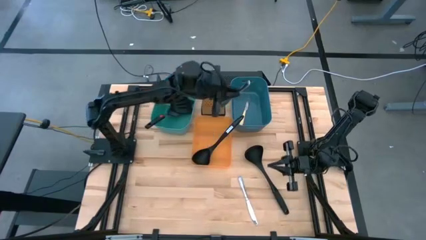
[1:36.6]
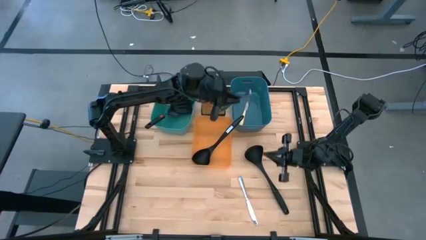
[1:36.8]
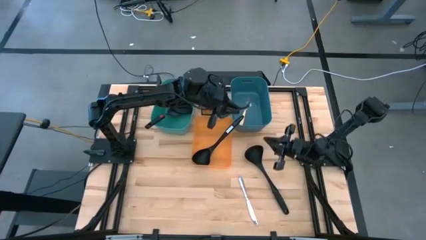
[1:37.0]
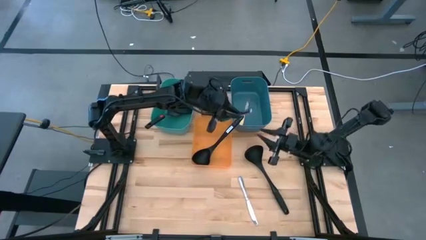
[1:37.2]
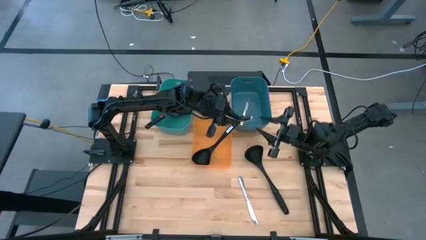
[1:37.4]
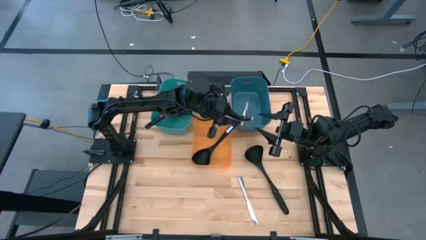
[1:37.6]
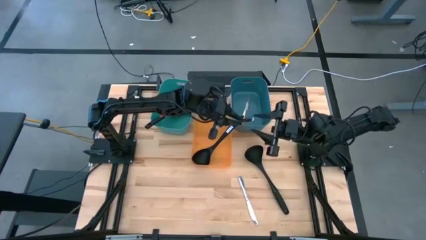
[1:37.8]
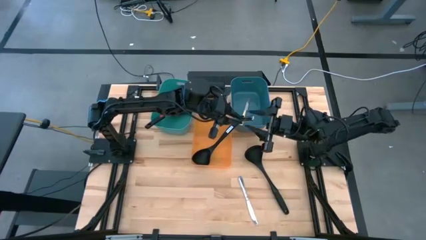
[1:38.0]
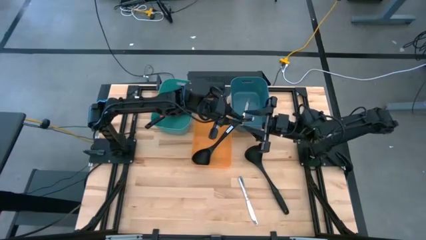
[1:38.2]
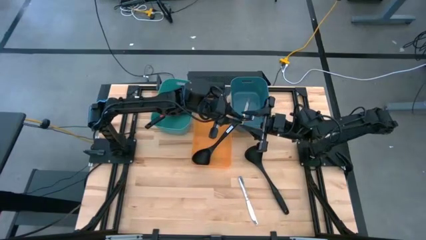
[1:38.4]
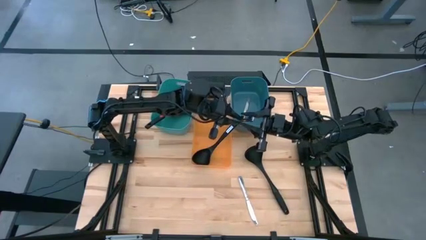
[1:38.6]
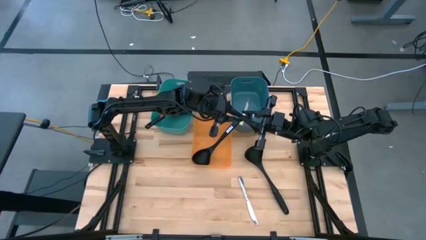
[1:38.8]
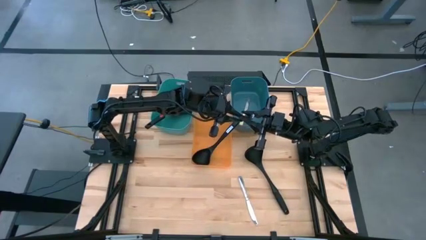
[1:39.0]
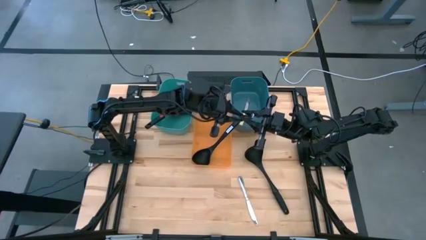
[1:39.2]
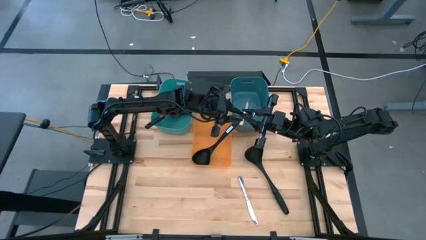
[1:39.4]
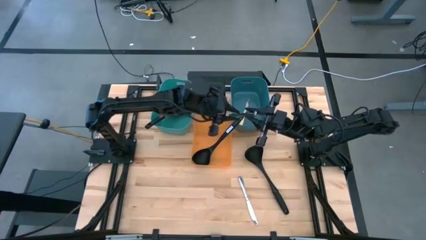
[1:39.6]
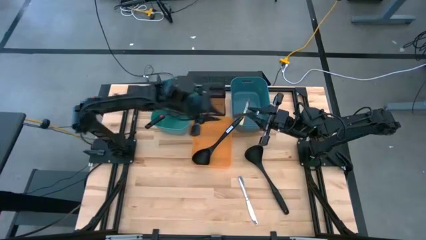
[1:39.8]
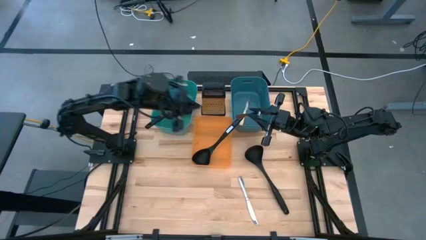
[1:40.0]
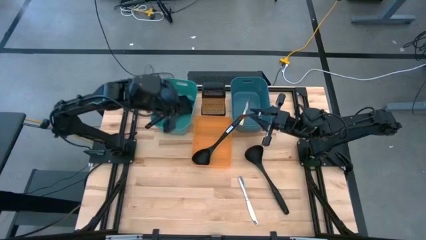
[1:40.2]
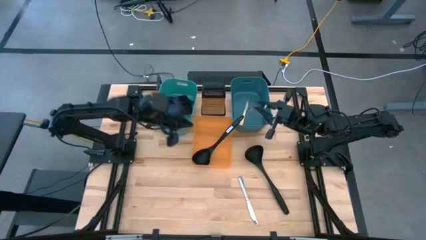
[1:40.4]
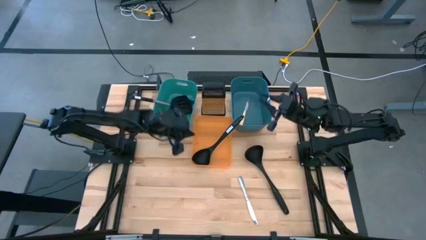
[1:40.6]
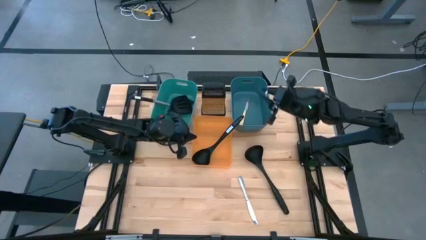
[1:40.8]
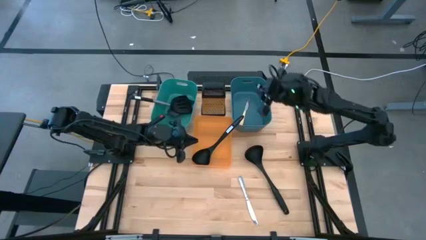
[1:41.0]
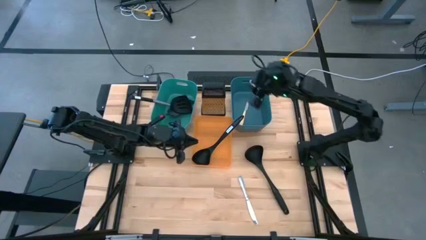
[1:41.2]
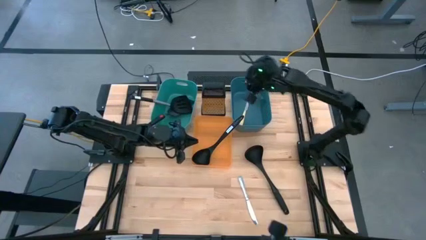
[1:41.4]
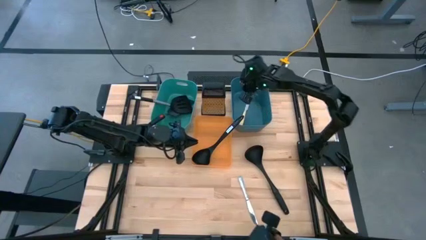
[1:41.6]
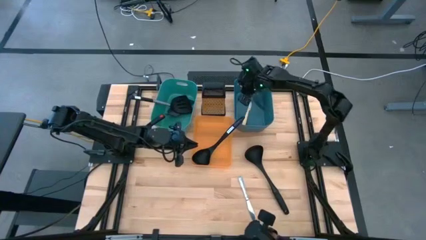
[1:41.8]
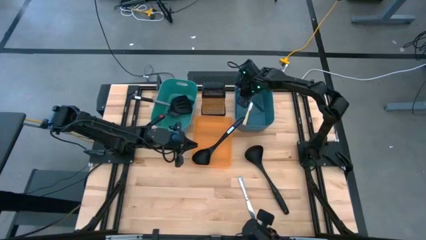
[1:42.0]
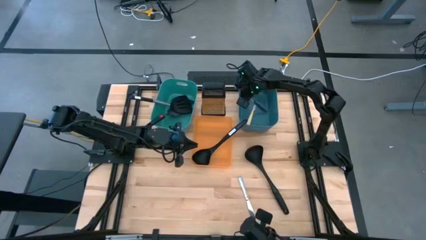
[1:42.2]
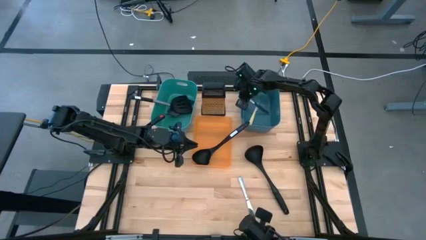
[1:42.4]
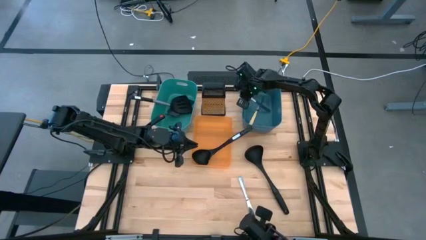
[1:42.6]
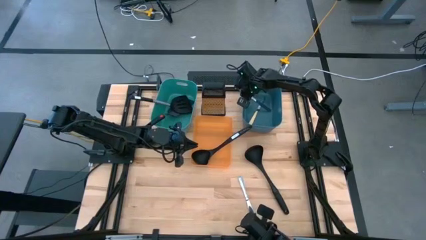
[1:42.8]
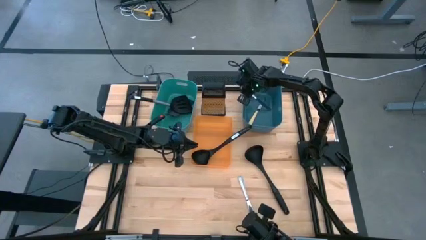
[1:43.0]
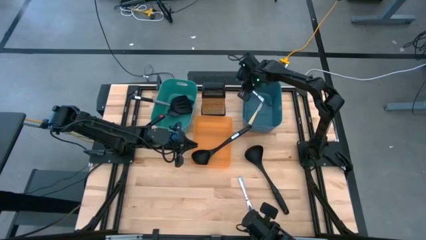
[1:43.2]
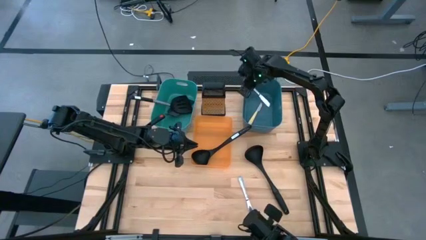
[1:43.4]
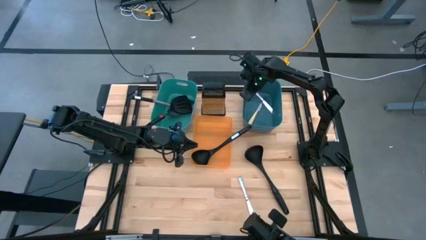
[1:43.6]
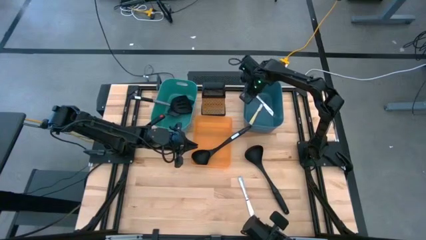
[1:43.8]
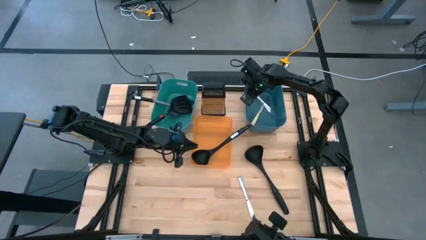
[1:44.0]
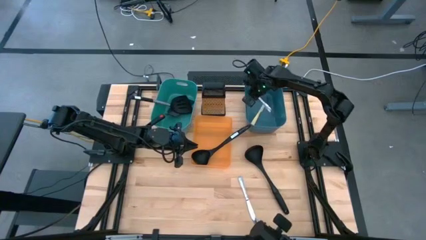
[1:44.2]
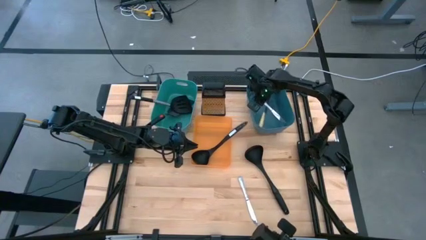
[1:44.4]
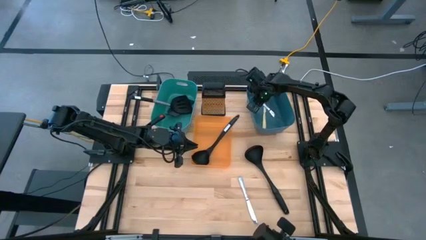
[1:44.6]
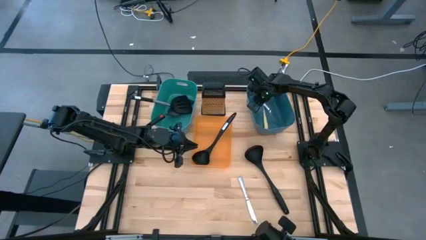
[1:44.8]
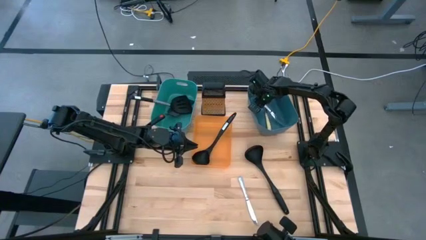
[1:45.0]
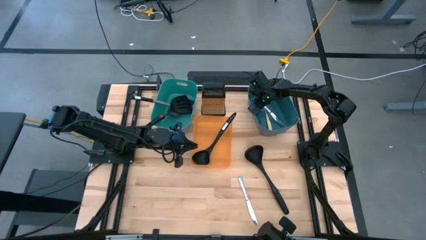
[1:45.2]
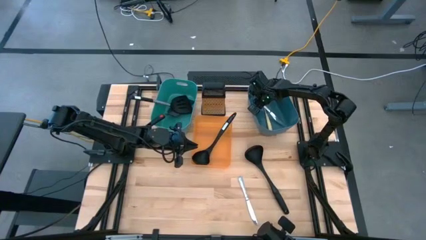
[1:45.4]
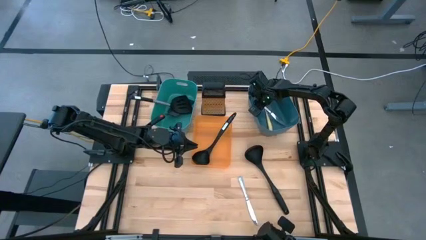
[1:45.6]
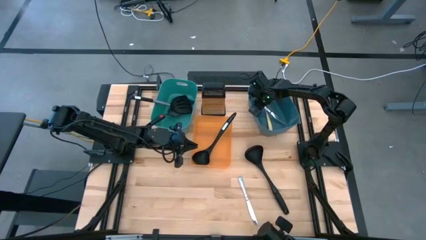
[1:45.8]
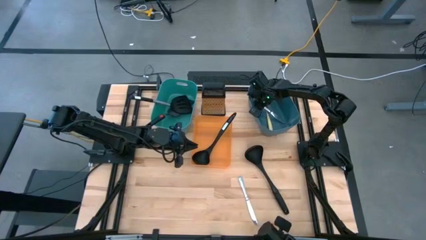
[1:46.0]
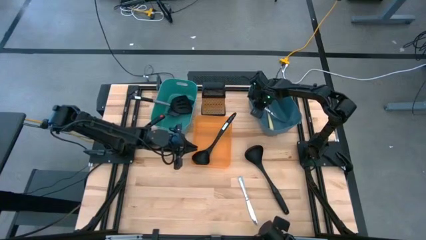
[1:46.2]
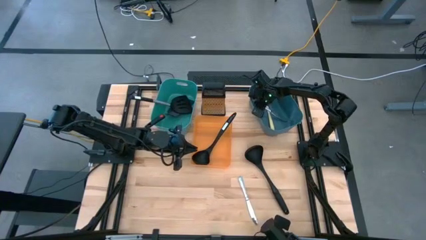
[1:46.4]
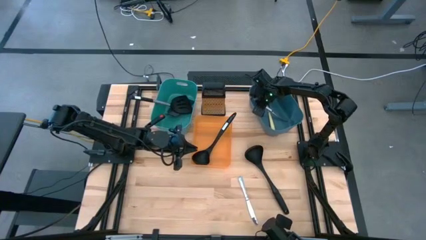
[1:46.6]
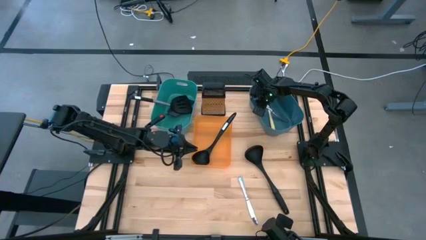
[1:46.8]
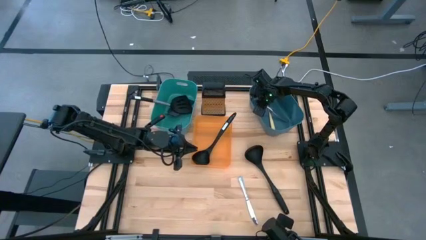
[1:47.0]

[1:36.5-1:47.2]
Task: Pick & Place Kitchen Items
Put the left silver knife into the blue bin

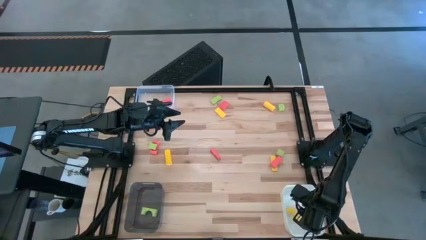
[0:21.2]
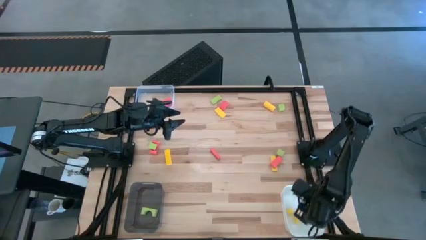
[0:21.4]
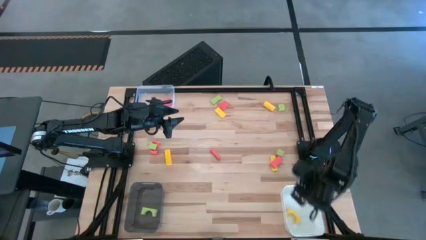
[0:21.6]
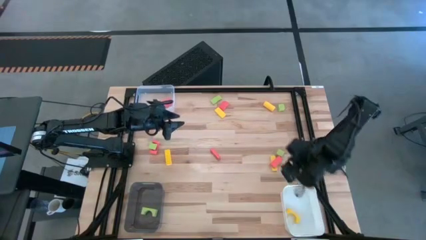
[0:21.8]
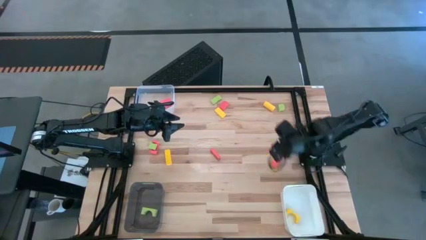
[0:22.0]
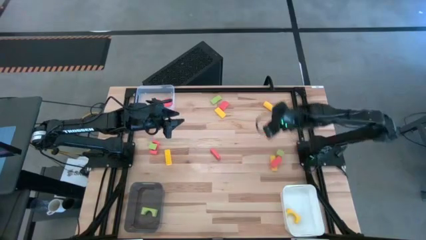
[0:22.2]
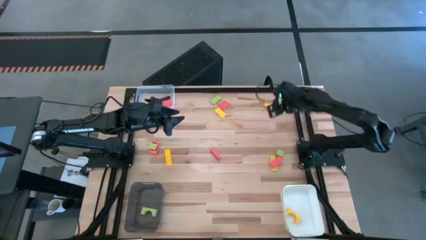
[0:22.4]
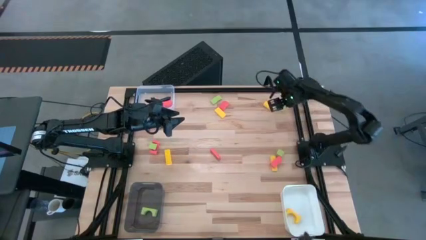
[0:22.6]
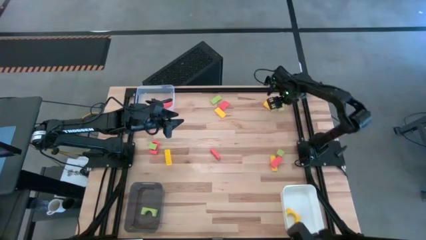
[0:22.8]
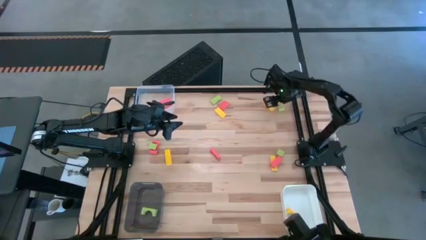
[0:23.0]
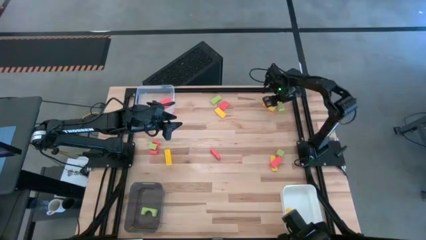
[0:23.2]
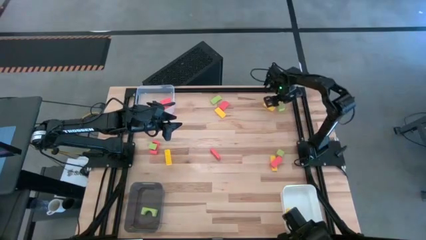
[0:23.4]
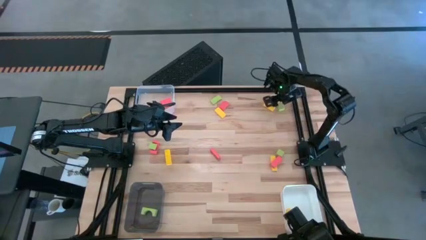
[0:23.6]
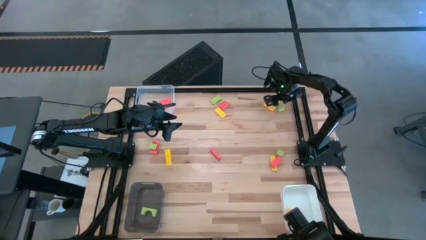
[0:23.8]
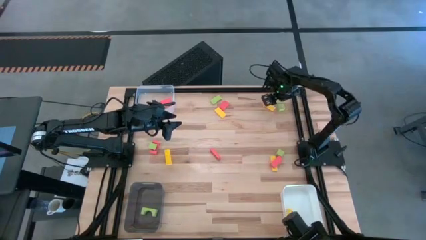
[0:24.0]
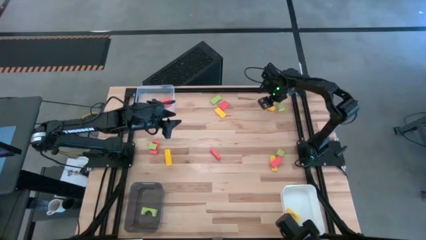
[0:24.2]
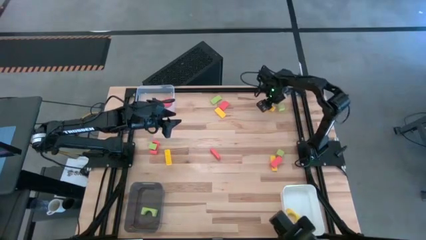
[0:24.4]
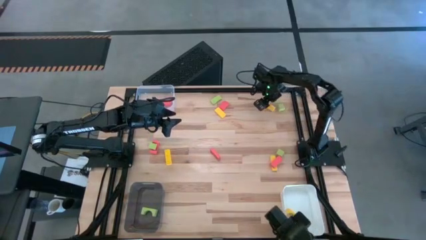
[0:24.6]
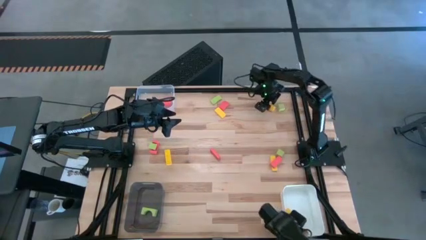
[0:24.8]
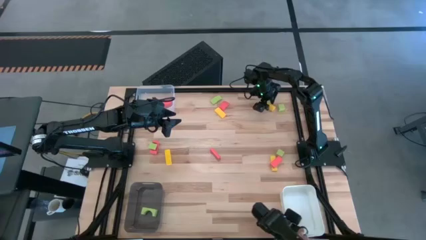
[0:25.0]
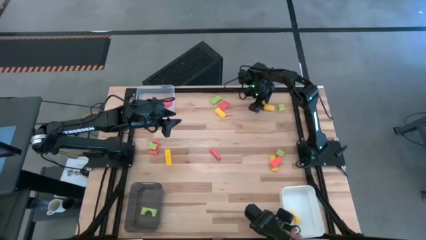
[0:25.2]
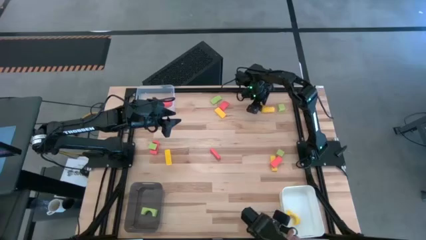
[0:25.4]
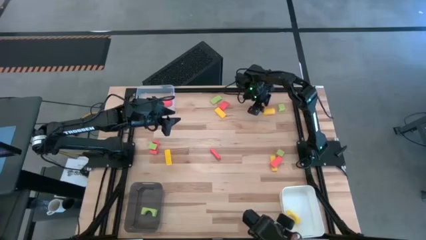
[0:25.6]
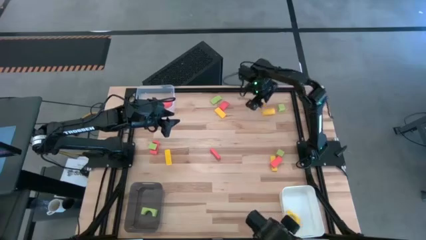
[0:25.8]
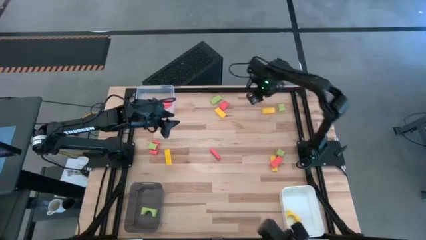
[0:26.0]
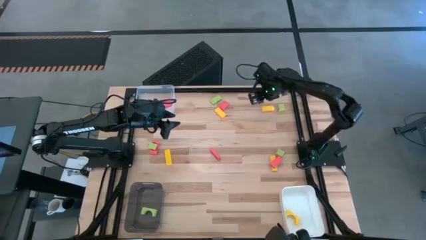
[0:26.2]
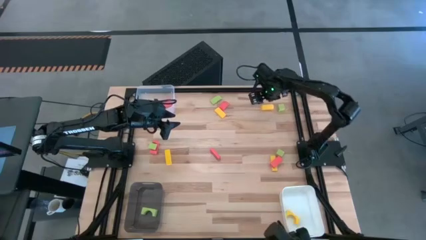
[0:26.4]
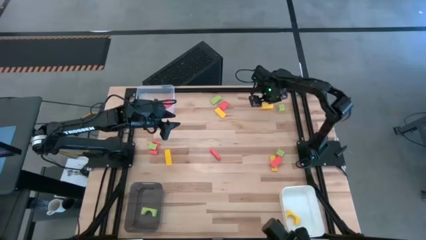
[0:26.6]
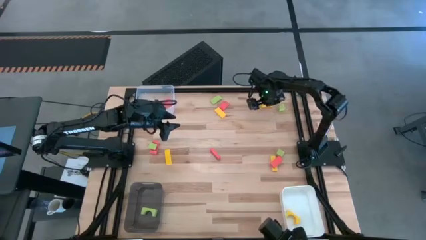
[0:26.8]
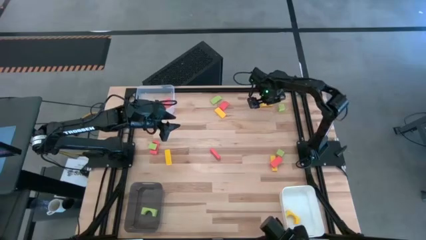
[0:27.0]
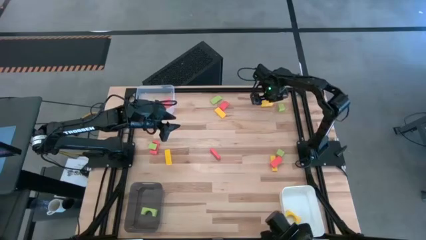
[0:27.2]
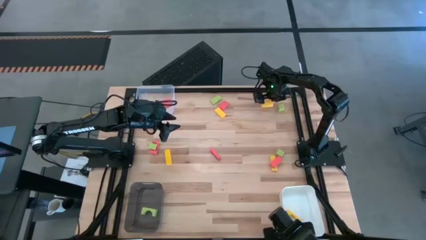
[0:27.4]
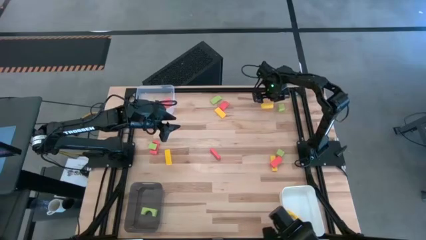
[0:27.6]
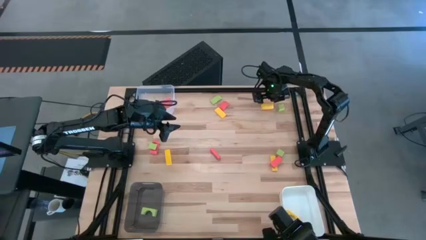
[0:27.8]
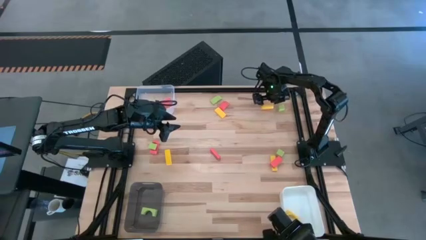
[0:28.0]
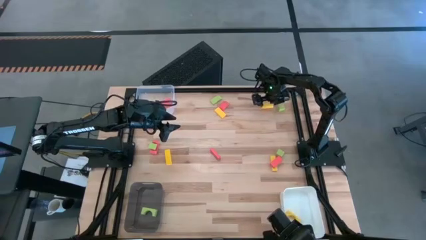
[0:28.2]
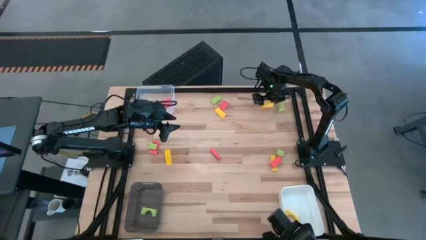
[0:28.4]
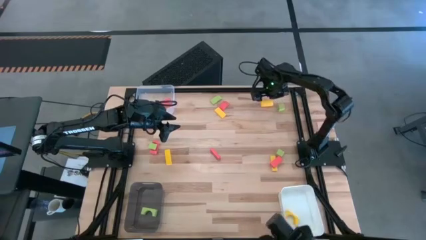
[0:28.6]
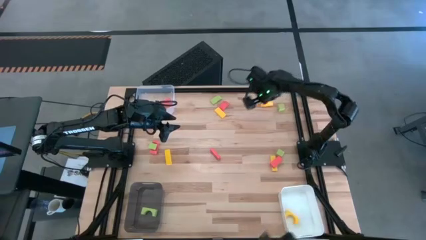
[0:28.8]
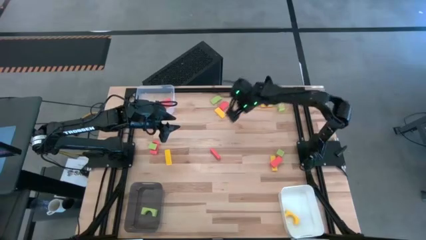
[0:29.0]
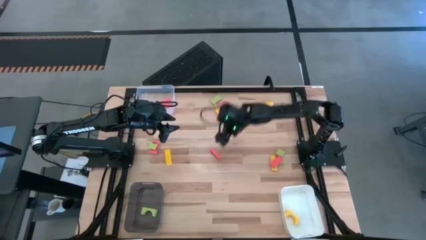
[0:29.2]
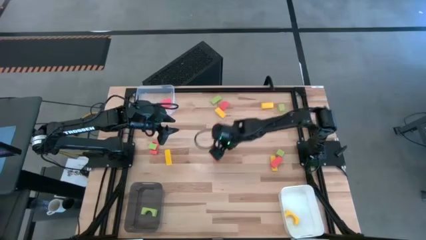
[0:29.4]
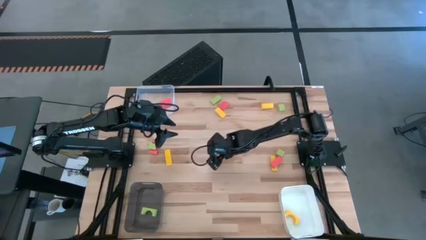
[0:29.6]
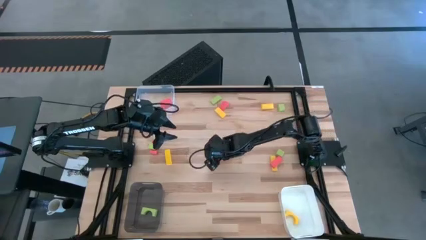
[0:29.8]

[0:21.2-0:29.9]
Task: Sort & place blocks by color
Put the orange block into the white transparent bin
